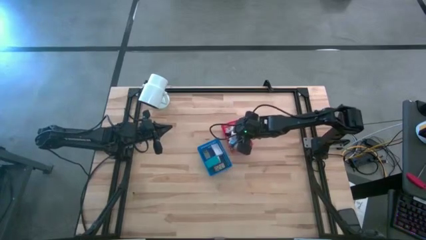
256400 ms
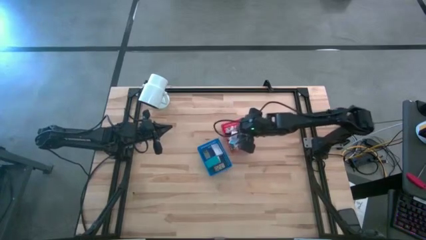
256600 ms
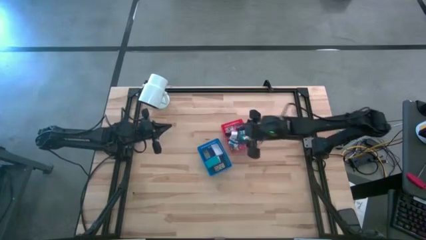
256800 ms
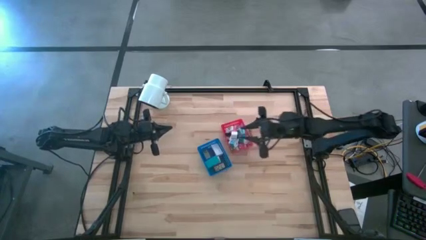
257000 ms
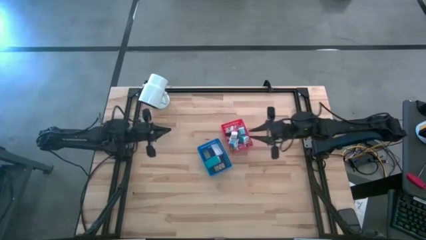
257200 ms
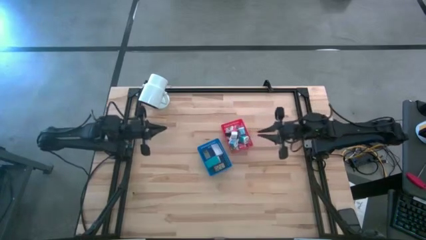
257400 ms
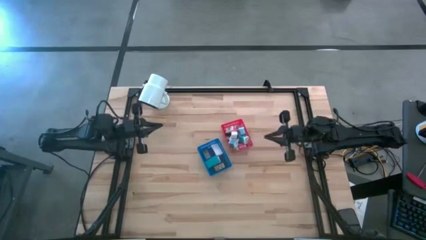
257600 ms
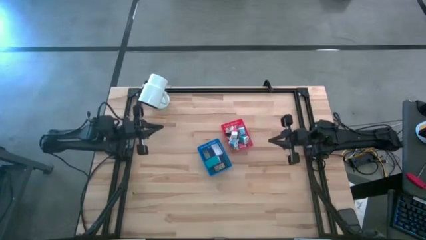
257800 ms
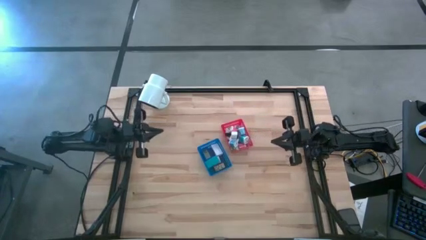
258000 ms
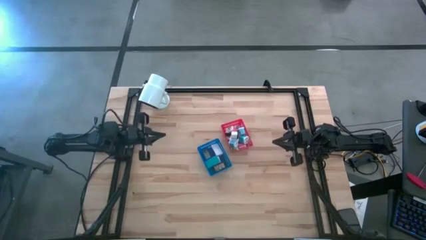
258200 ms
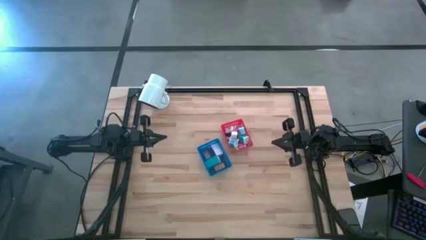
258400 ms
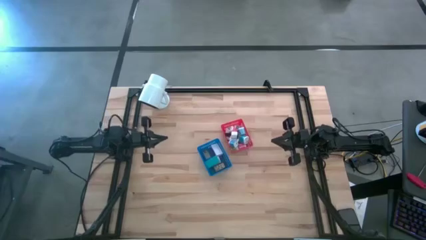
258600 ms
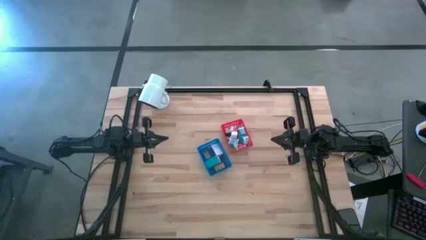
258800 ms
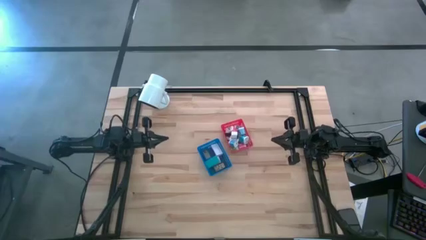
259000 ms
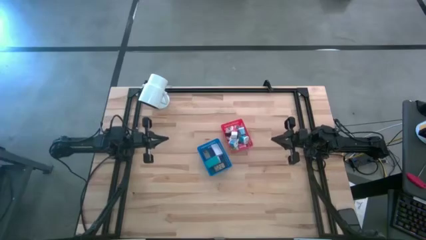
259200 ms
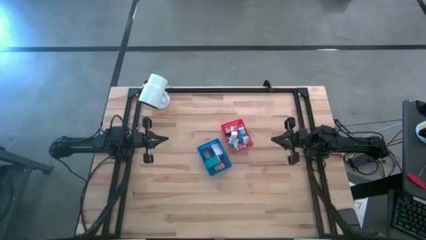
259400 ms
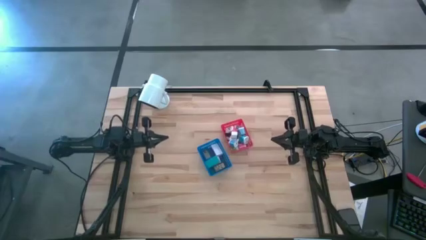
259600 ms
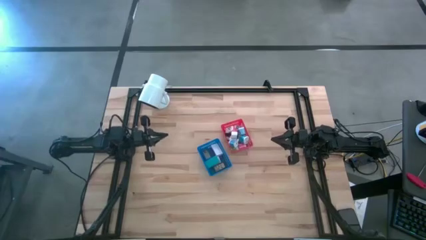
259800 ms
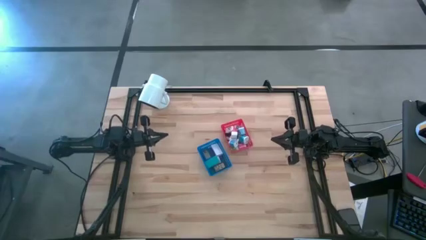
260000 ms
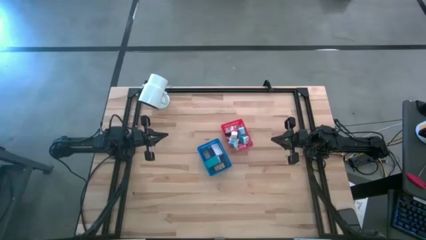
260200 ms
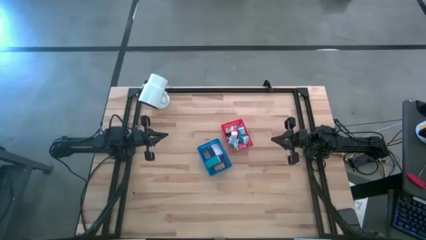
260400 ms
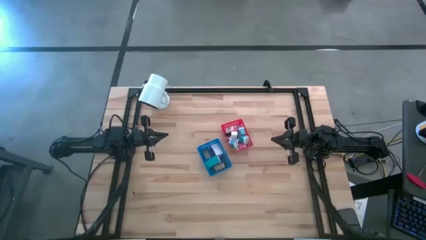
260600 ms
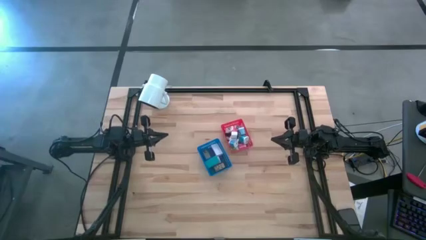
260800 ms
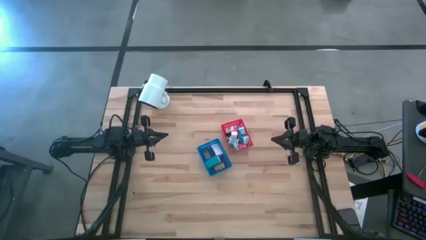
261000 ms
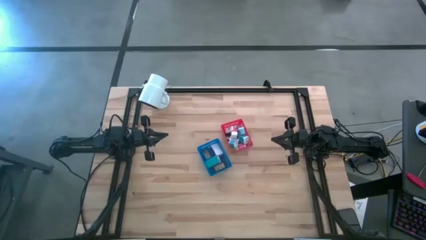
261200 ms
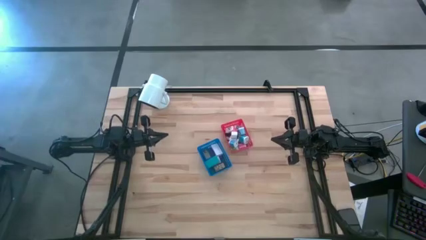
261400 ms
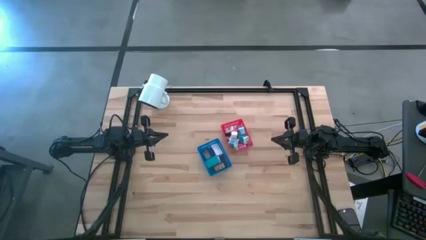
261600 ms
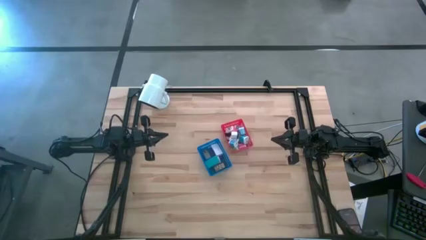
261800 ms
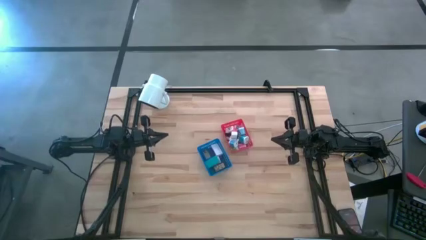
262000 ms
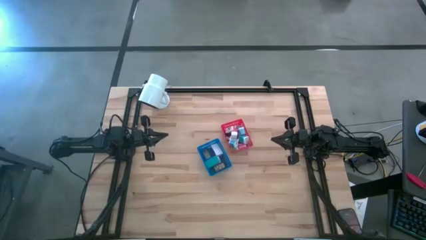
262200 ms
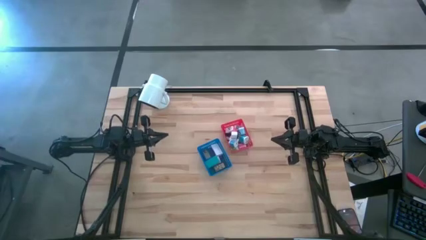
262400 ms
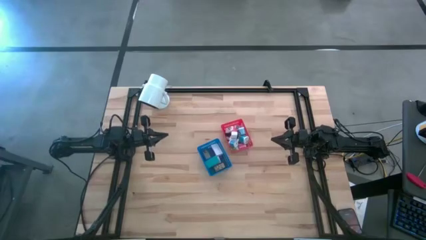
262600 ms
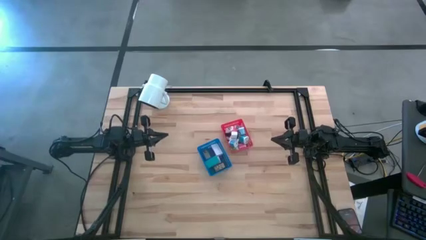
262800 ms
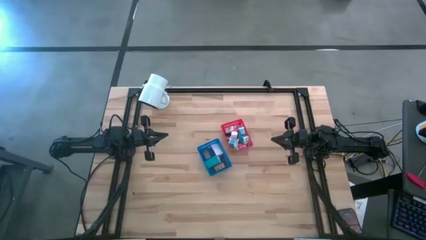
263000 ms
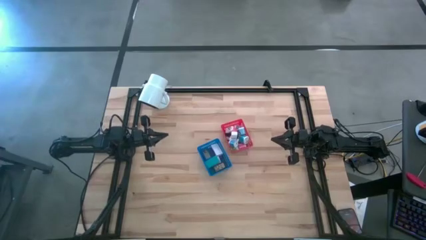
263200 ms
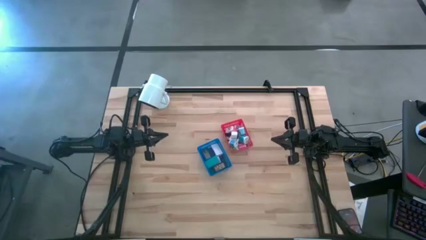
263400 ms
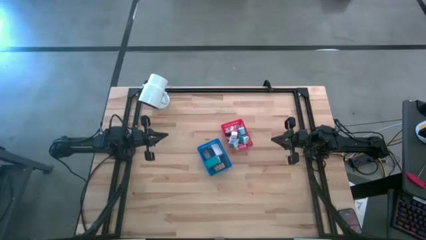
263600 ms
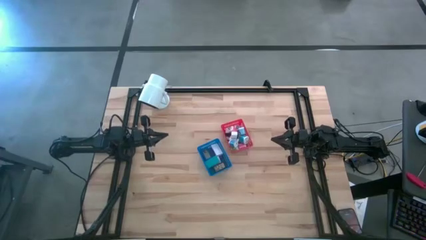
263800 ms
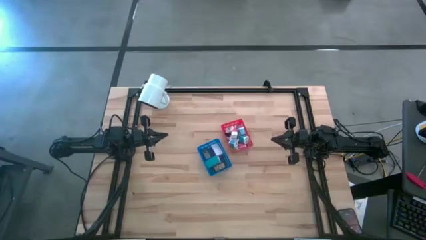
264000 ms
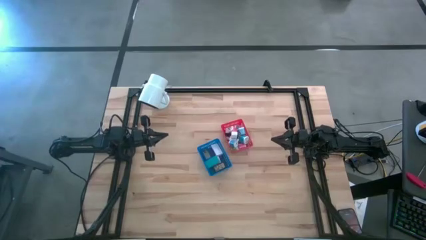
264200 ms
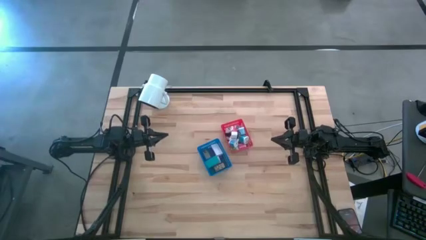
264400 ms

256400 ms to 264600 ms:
Task: Pick & Place Office items
Return to Home Position

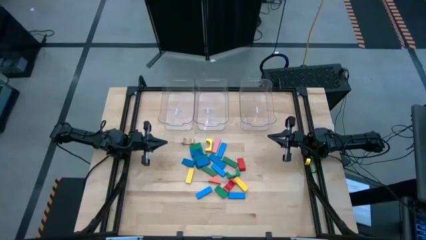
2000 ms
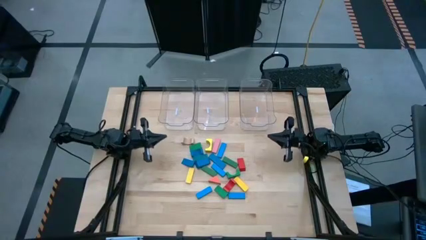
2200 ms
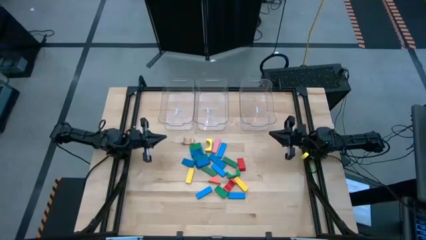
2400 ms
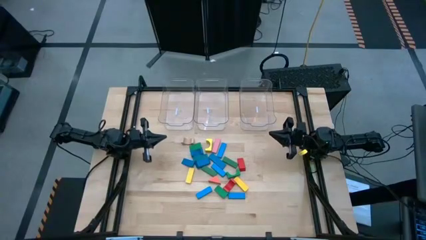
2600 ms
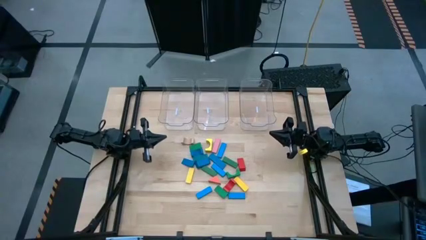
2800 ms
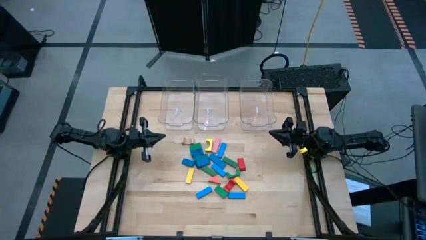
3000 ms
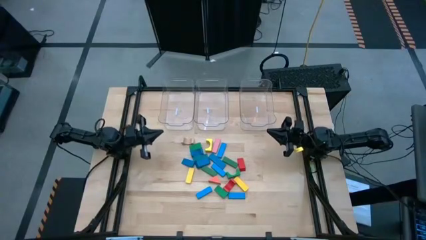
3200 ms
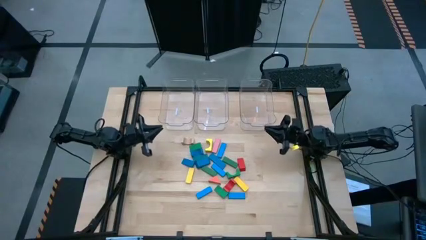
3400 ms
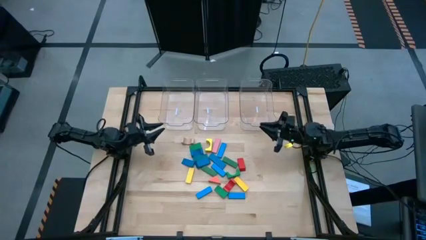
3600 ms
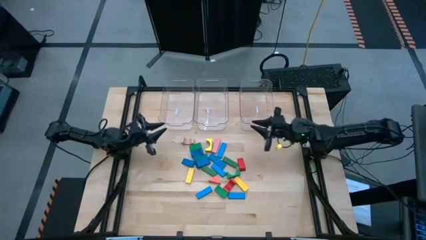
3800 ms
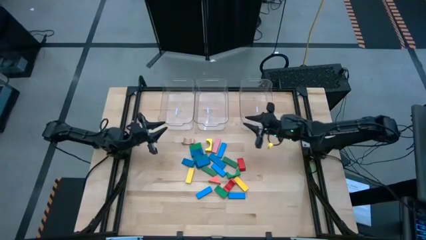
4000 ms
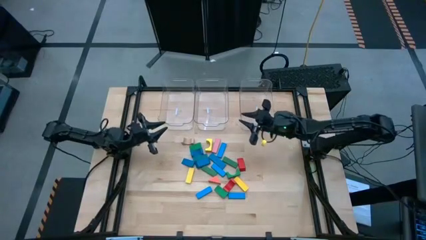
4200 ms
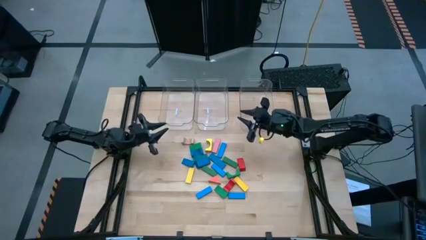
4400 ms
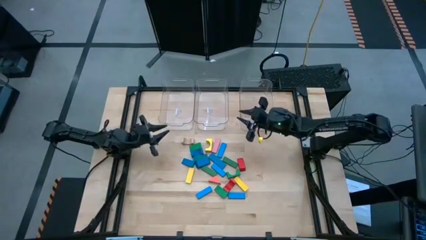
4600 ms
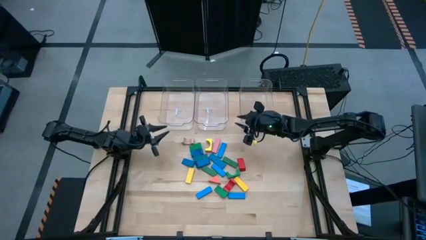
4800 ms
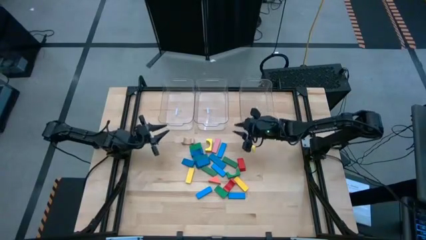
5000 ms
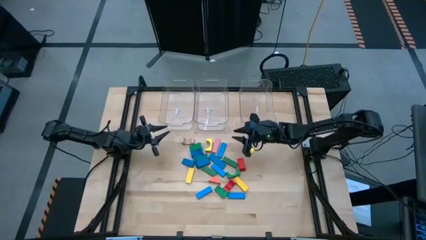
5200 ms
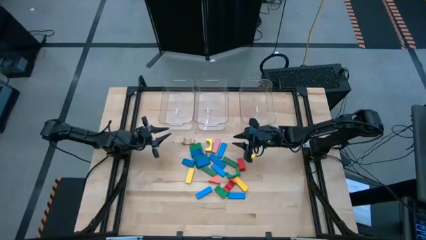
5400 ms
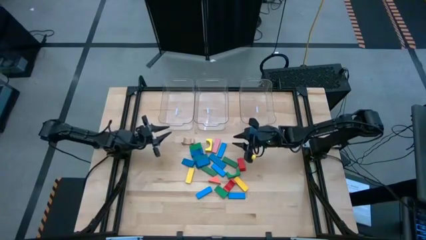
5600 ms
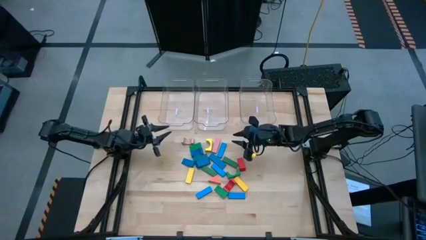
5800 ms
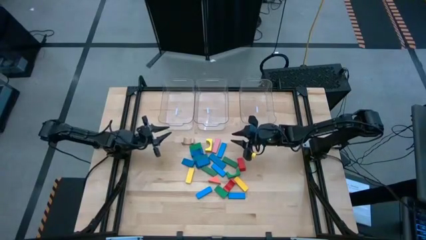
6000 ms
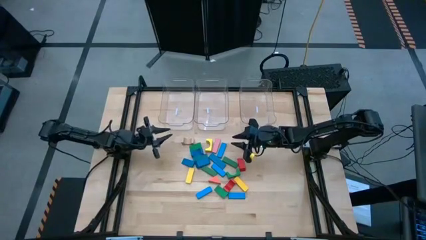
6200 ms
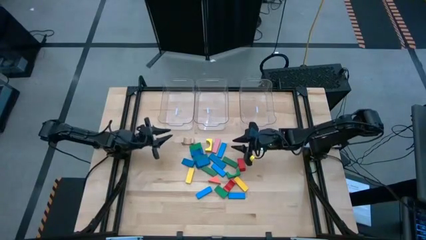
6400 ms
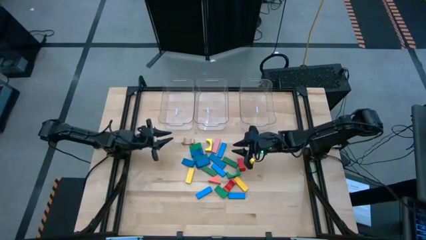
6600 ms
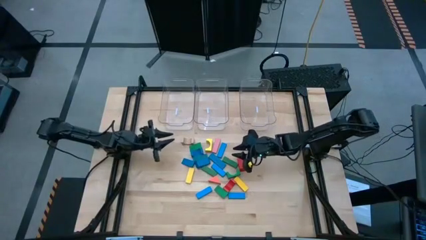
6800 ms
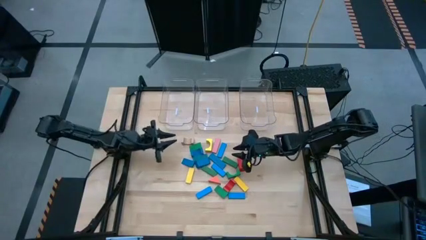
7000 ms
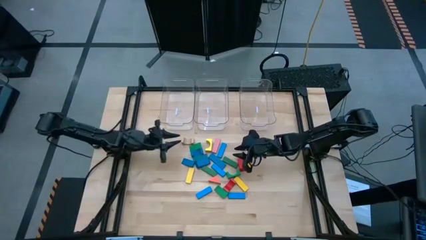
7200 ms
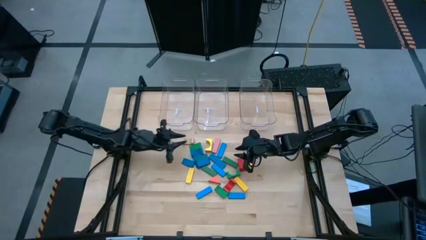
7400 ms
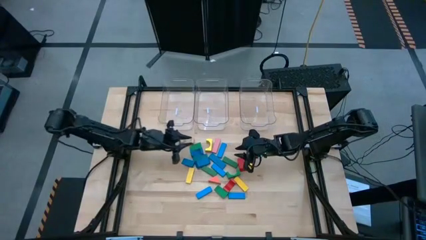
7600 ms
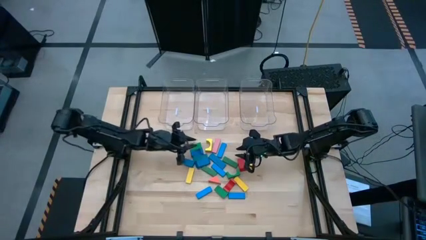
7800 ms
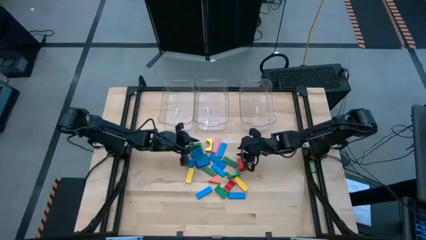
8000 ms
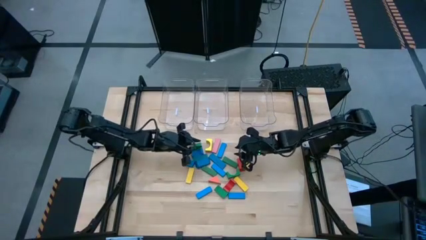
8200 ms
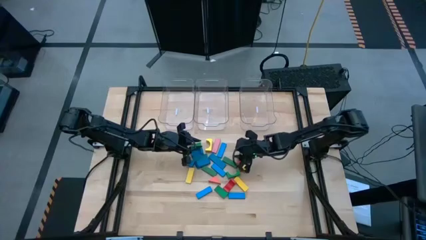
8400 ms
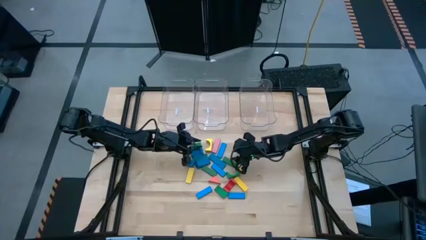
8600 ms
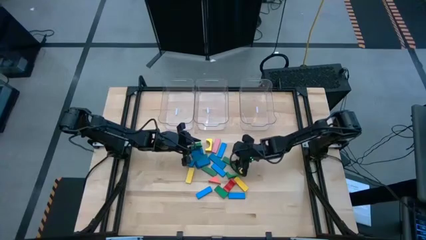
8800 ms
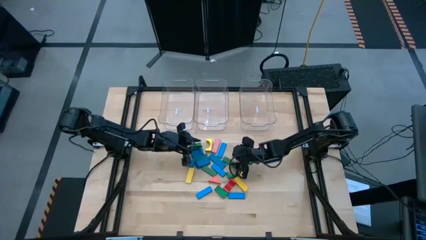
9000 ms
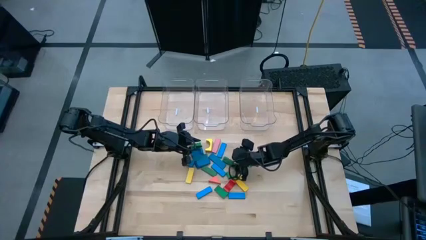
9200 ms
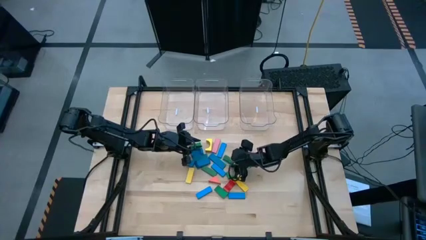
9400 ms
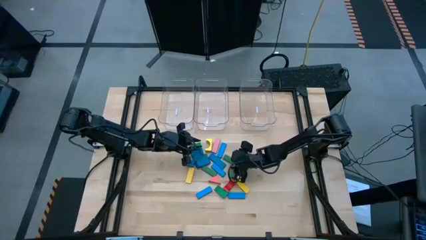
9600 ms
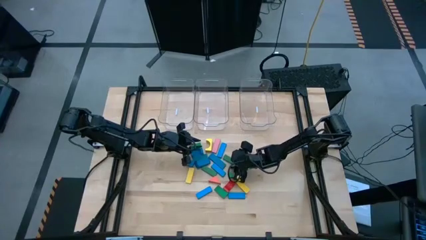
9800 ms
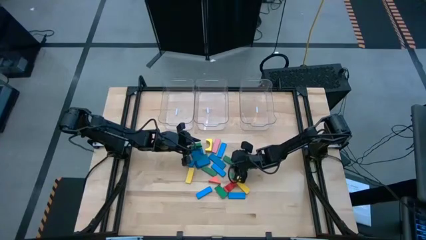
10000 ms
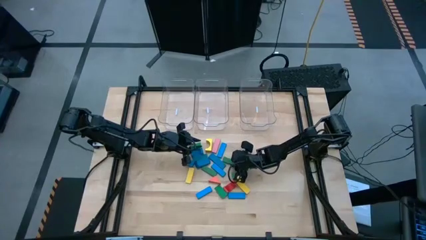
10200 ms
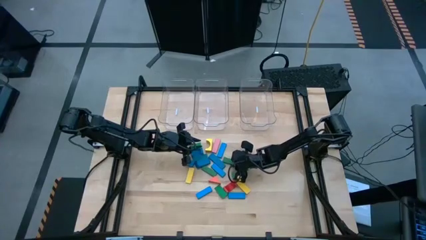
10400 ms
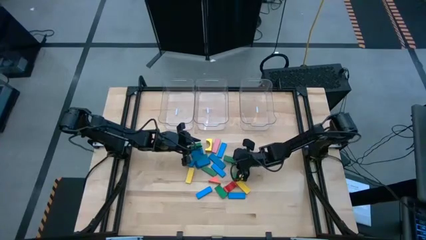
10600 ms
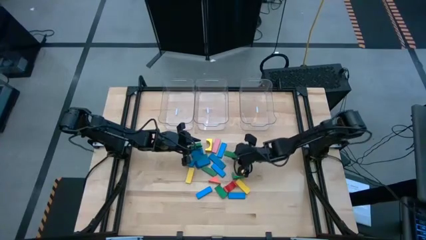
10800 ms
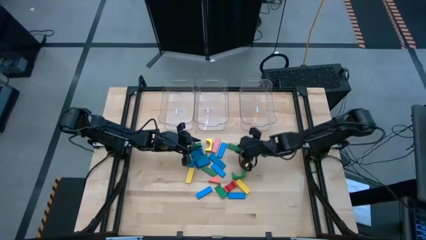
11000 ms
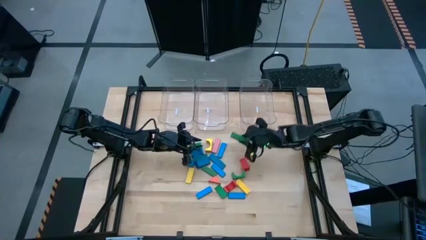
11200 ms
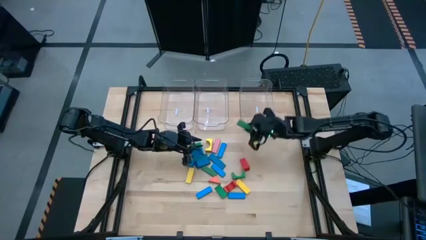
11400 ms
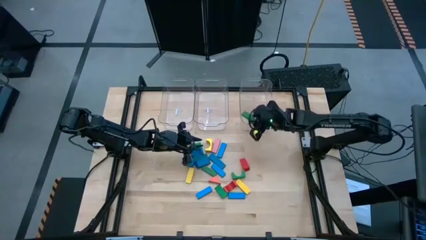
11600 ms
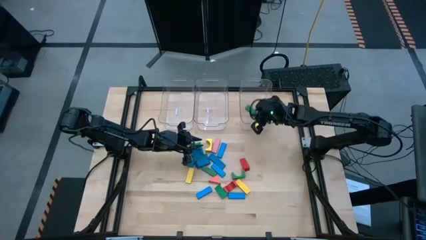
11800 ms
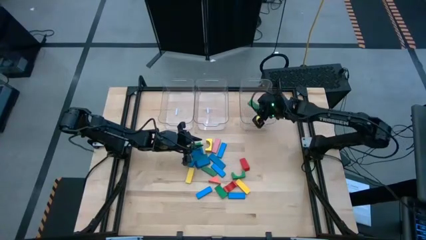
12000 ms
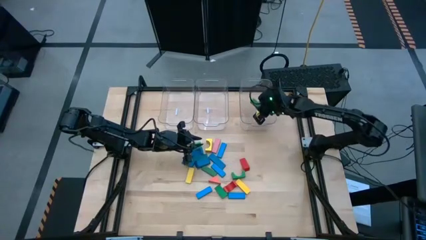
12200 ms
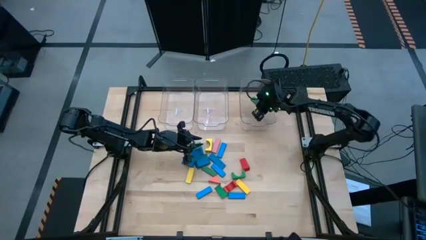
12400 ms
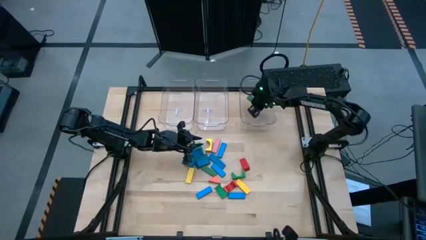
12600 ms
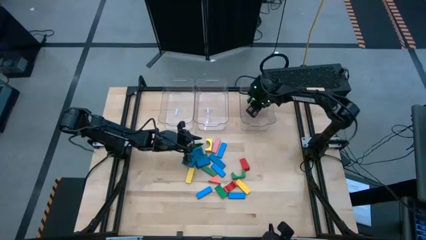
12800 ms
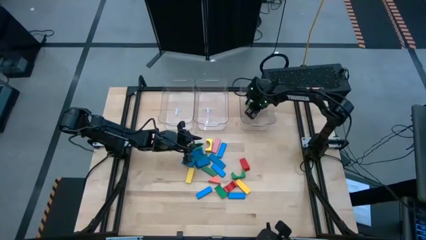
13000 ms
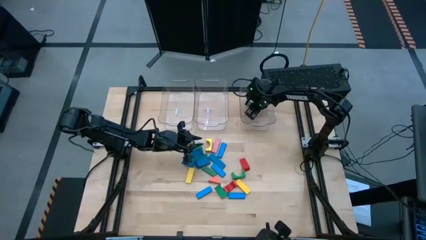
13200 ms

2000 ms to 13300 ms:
Task: Sort blocks by size
Put the green rectangular block into the right transparent bin
